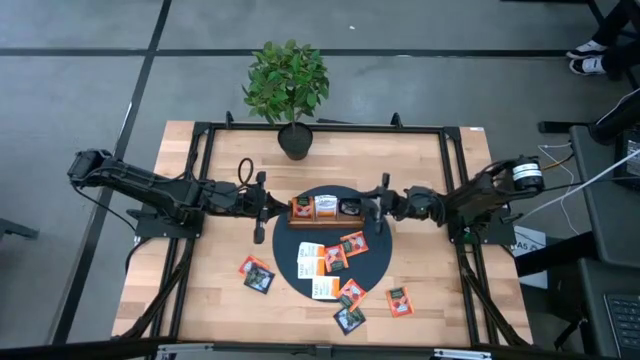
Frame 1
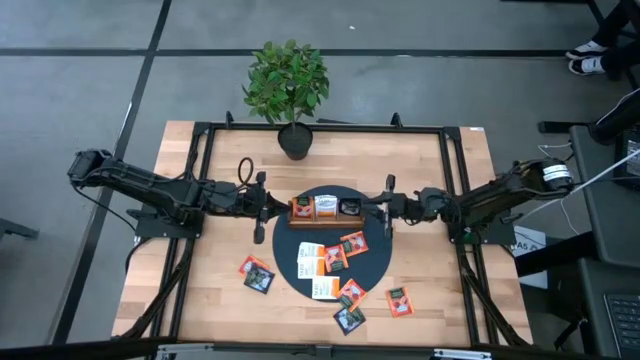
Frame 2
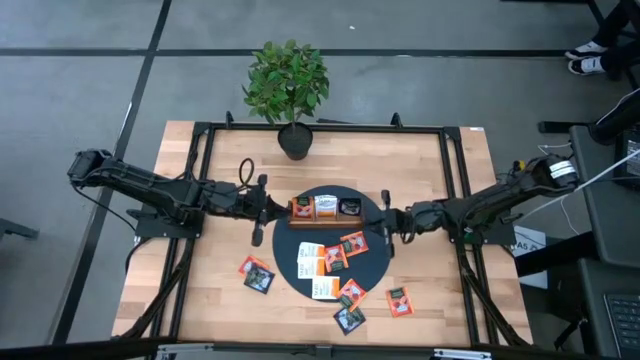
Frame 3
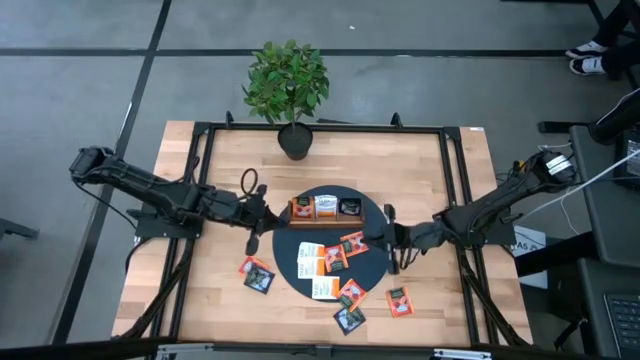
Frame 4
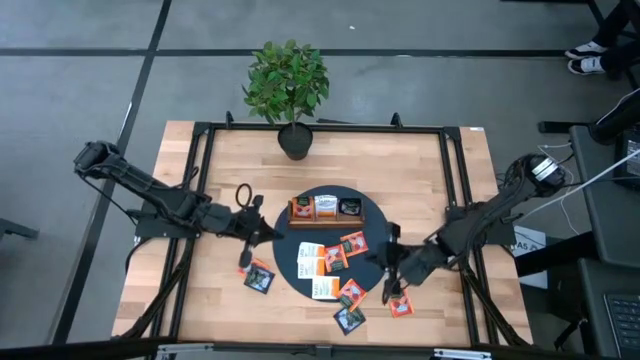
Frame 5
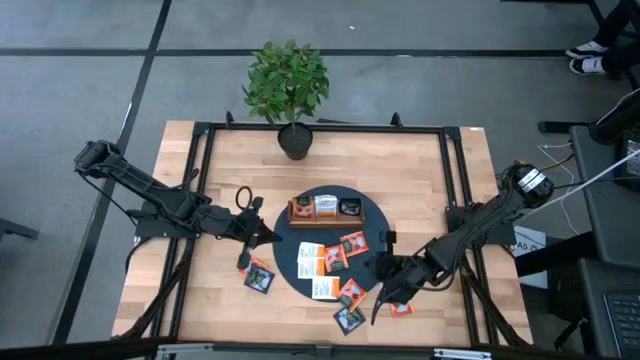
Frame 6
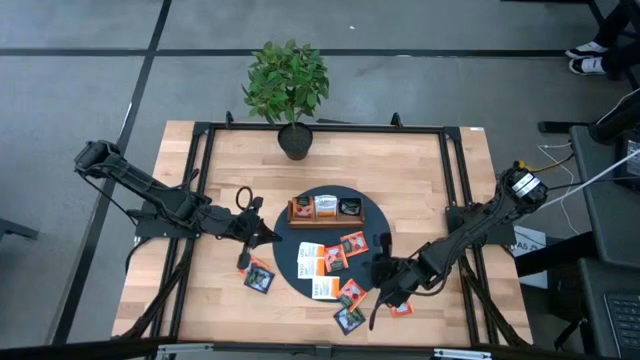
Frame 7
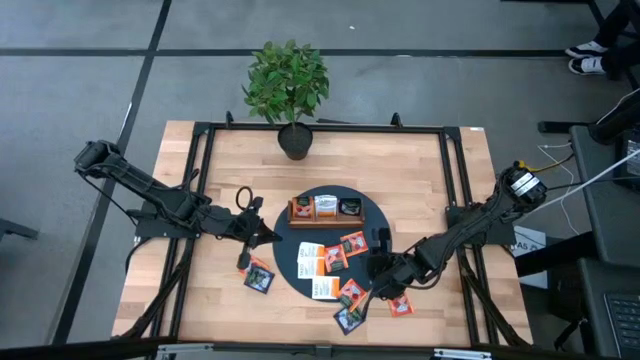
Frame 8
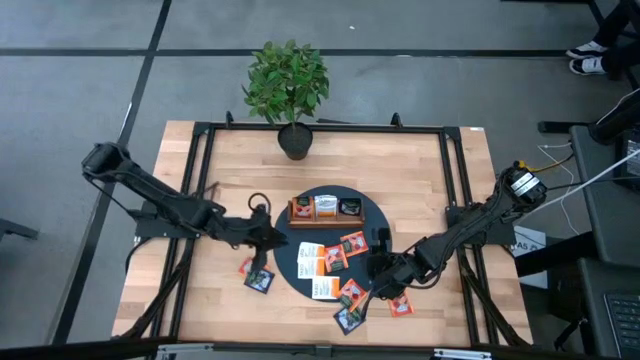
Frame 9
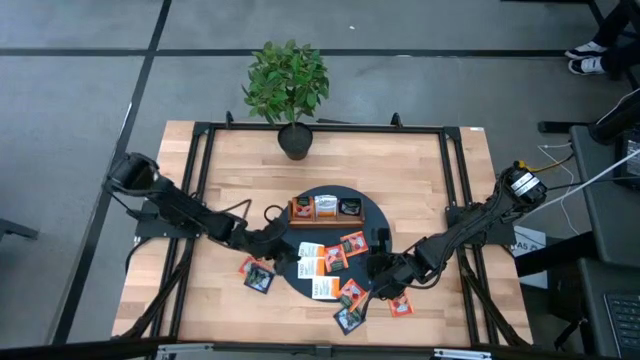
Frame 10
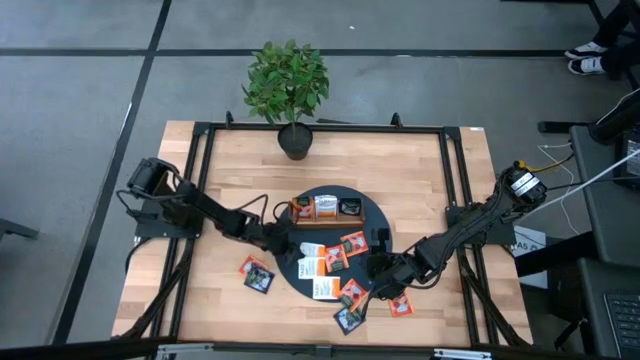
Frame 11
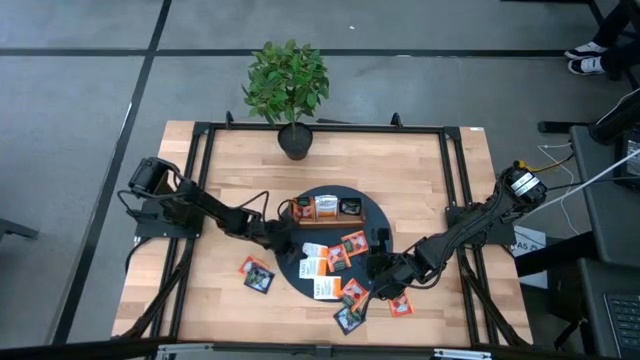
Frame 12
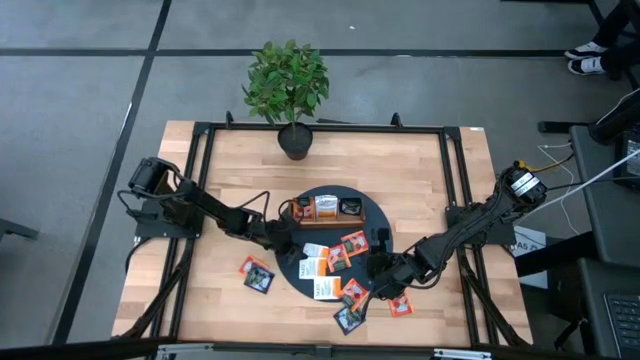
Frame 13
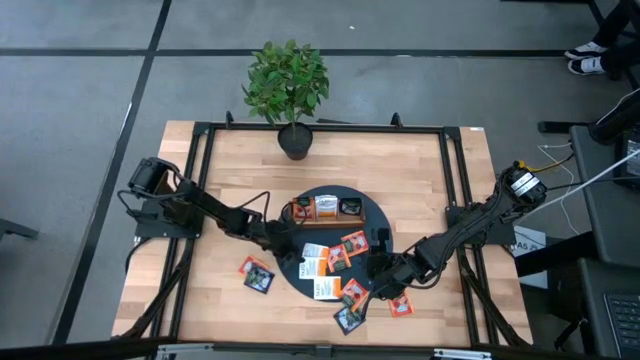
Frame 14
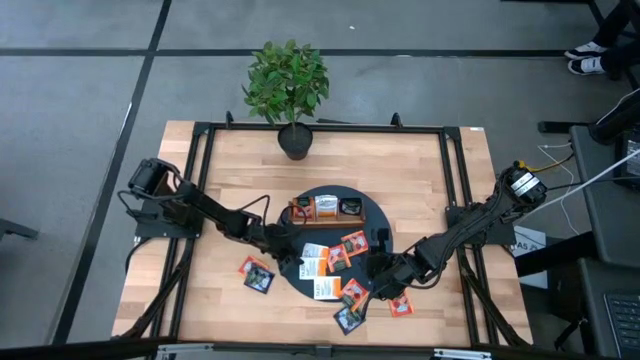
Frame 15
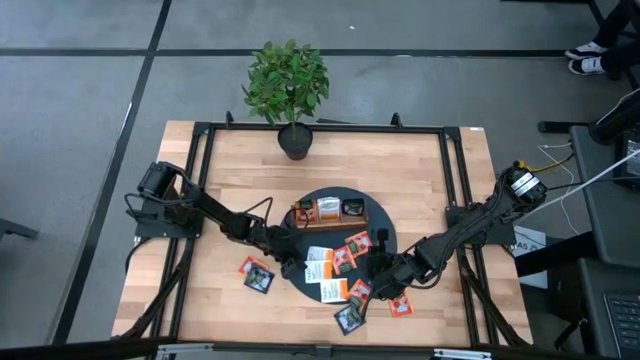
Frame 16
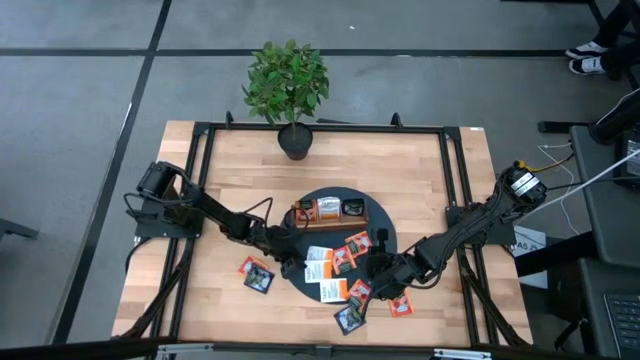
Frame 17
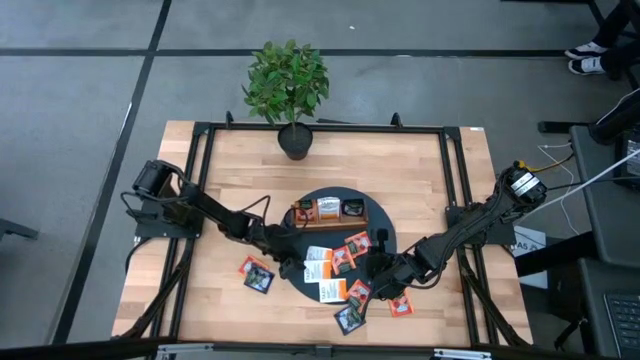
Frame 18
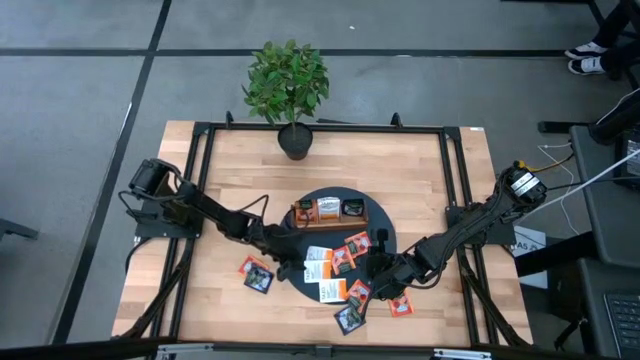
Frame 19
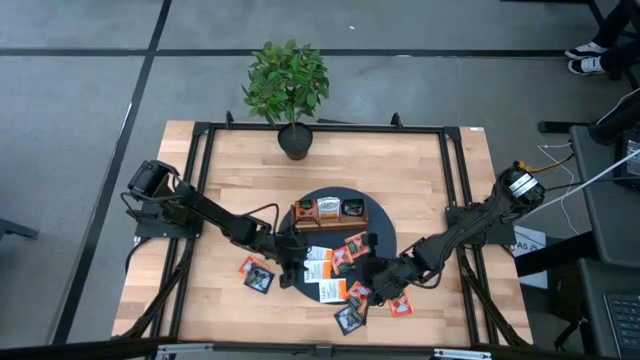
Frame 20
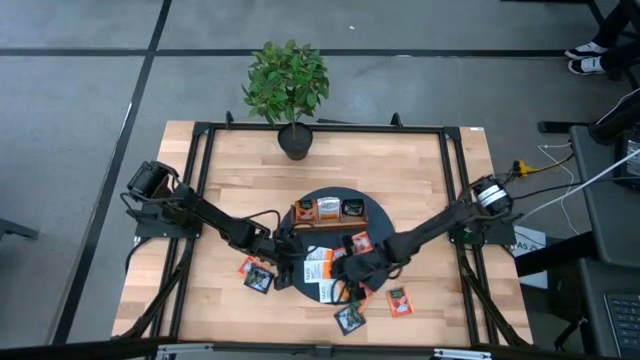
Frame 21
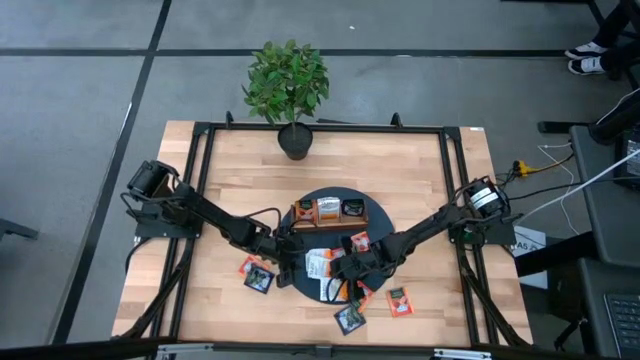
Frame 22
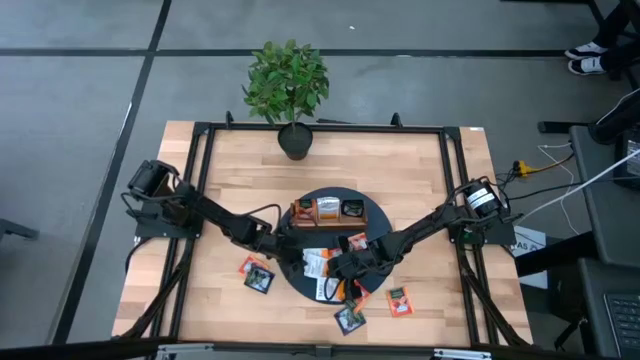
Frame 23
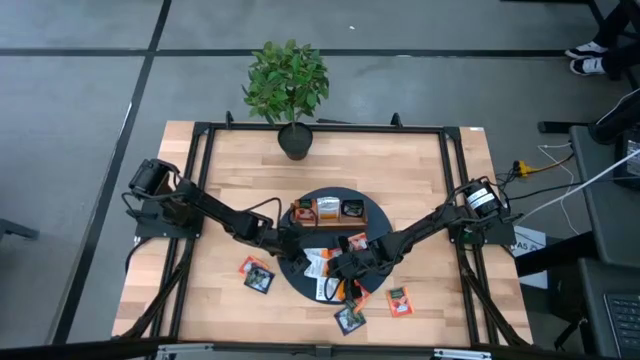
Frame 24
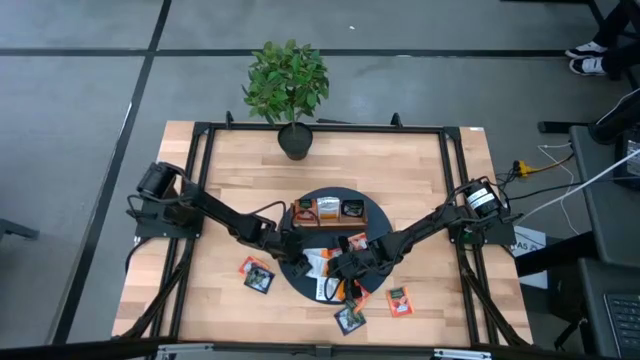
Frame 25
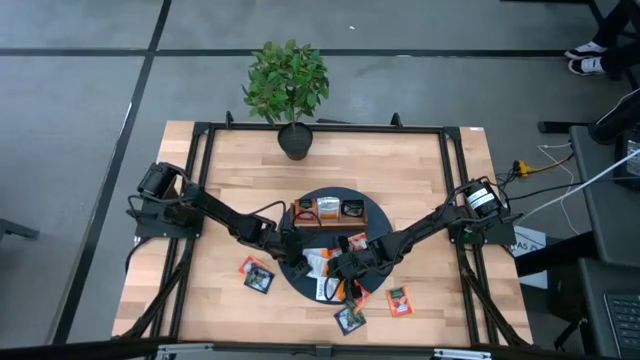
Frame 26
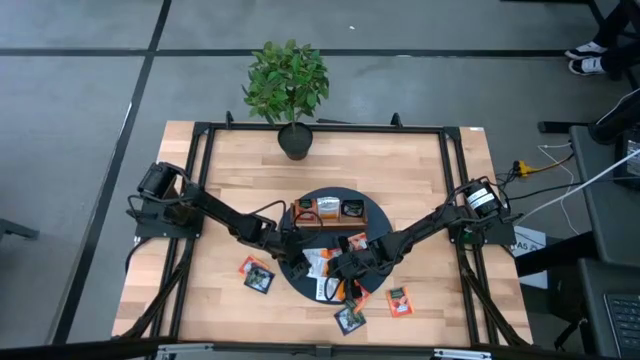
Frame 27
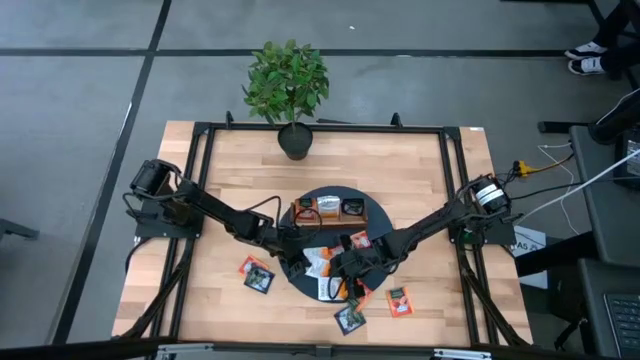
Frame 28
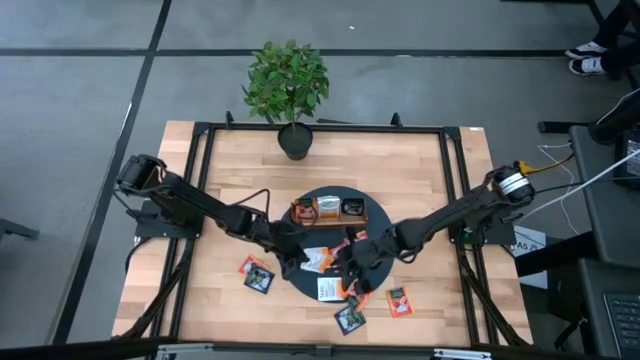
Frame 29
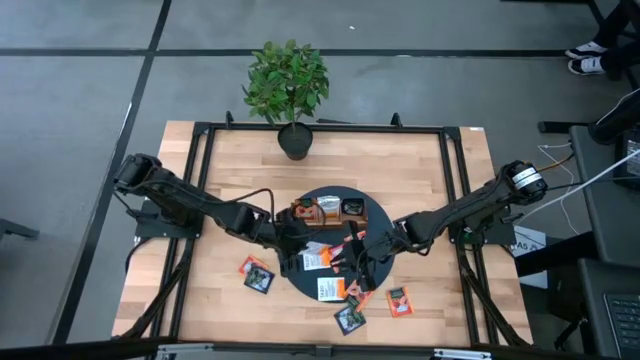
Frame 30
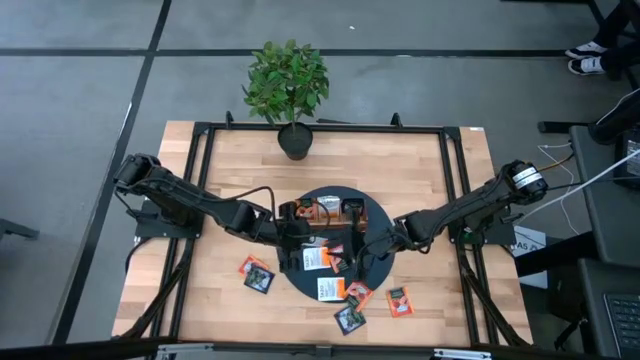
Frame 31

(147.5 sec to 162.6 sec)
Task: Pick & Place Tea
Put the white tea bag into the middle of the wooden organizer

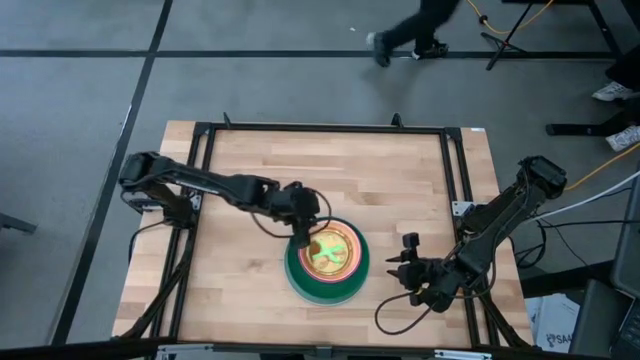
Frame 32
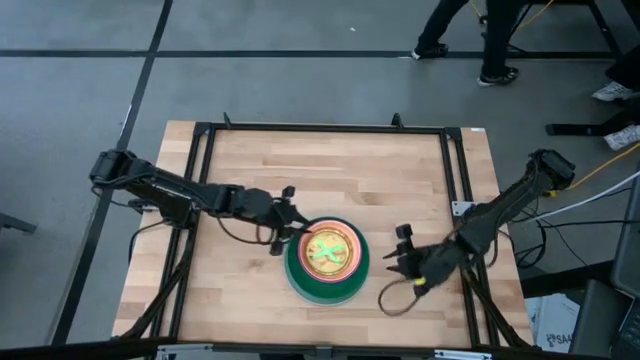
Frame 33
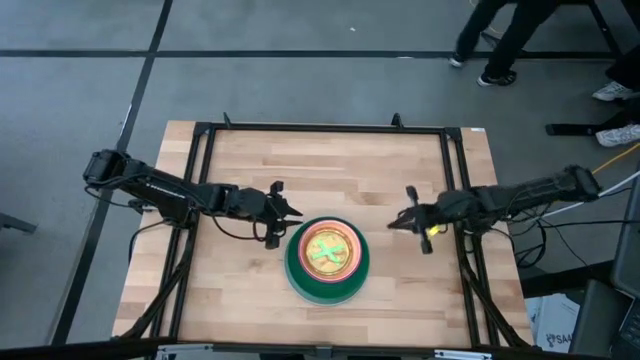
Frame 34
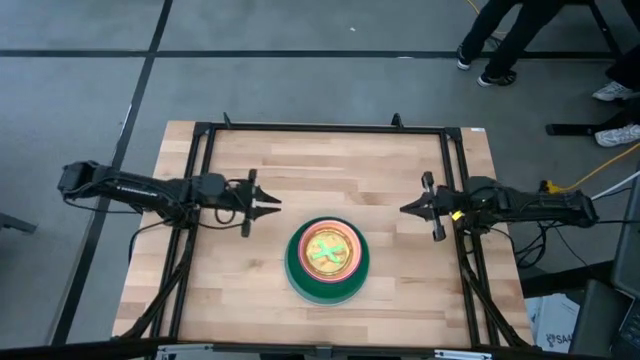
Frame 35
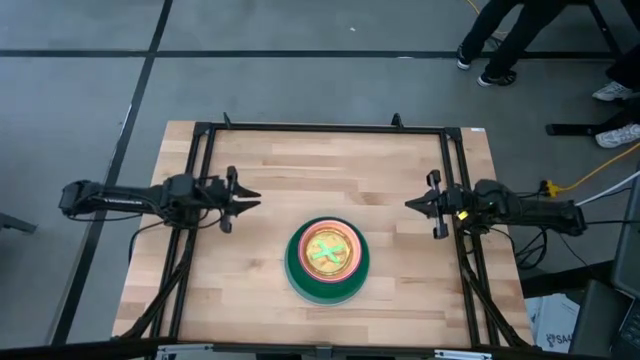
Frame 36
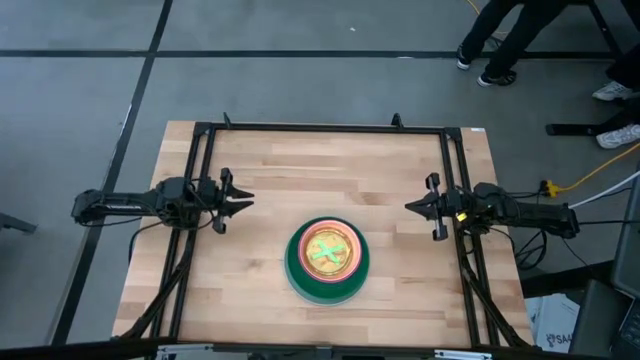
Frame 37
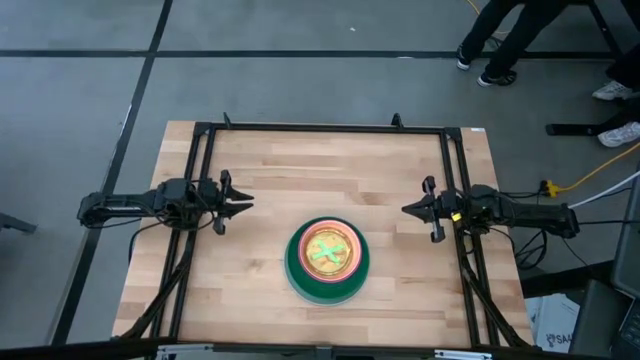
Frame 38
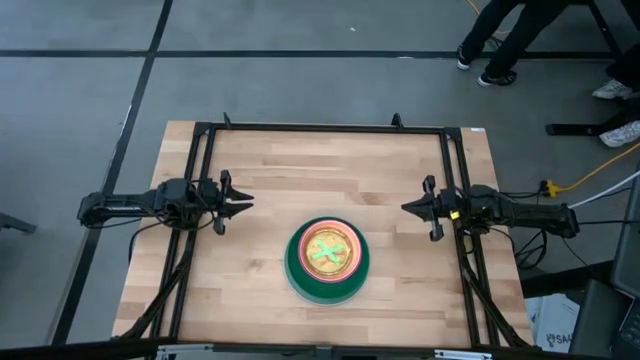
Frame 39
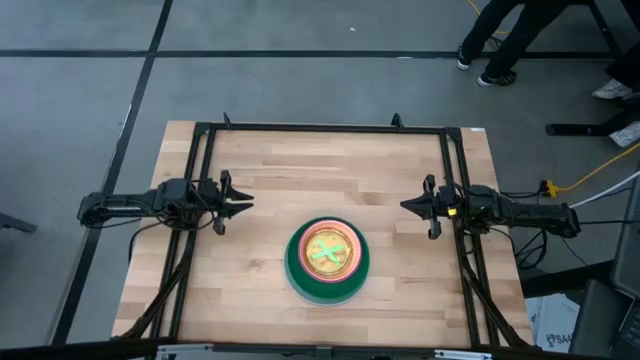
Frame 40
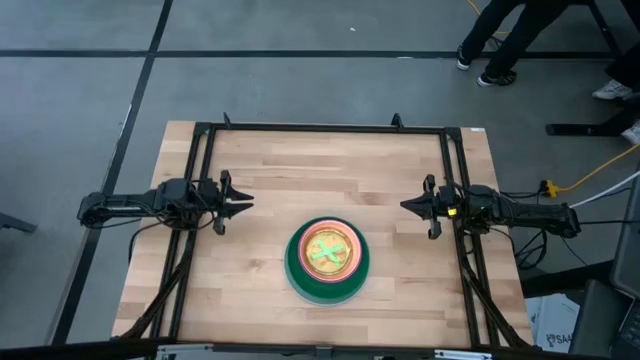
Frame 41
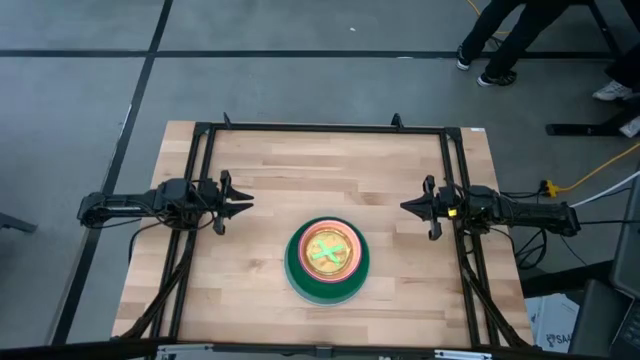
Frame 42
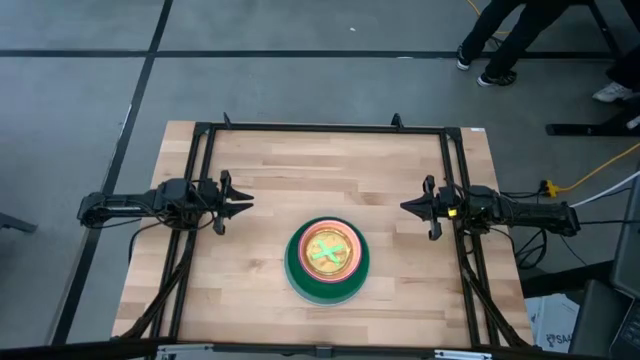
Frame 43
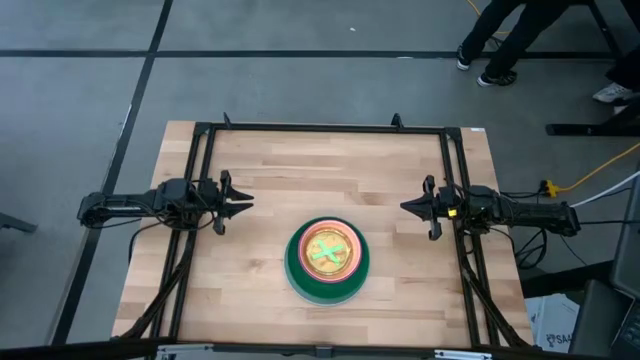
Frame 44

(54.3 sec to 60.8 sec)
Task: Stack plastic plates
Return to Home Position
